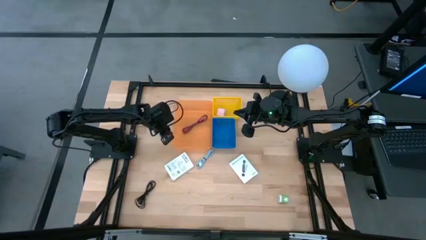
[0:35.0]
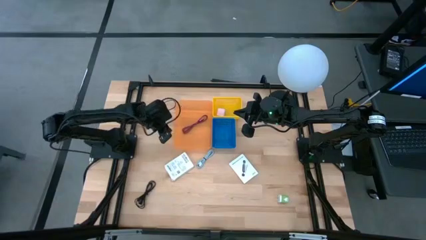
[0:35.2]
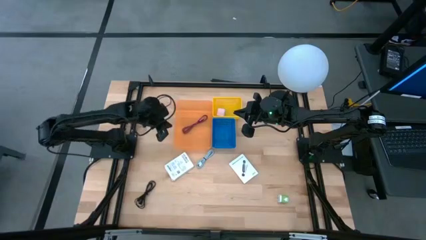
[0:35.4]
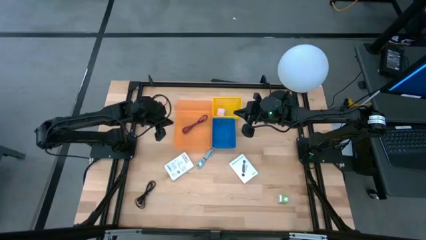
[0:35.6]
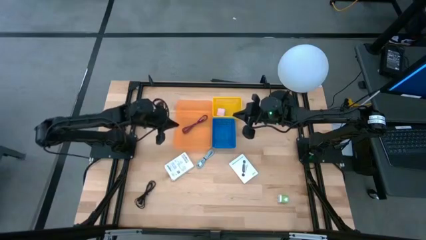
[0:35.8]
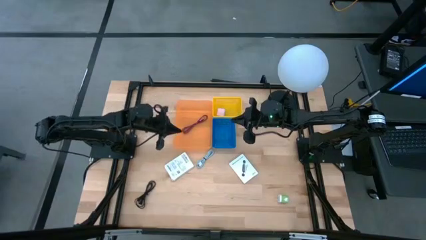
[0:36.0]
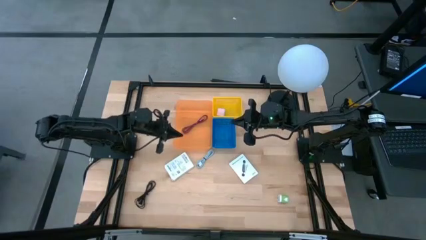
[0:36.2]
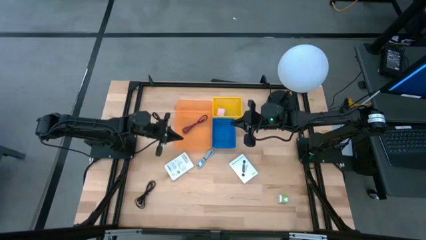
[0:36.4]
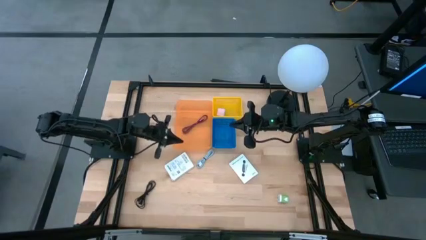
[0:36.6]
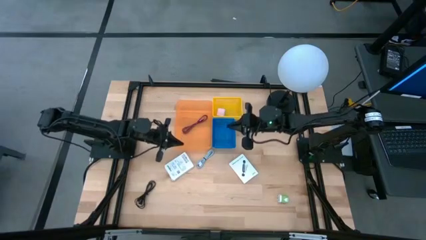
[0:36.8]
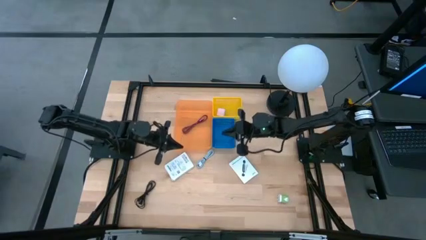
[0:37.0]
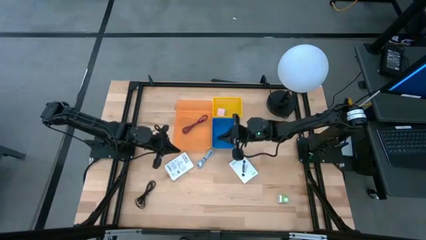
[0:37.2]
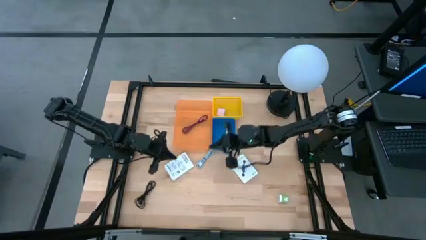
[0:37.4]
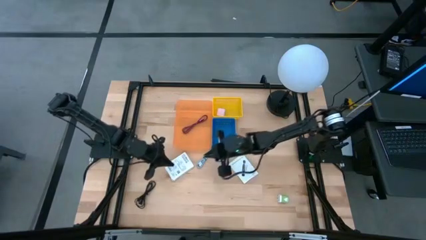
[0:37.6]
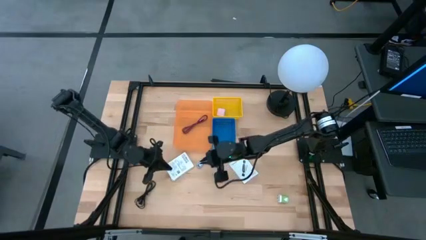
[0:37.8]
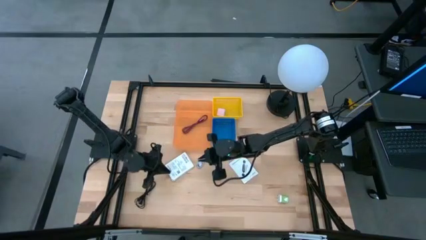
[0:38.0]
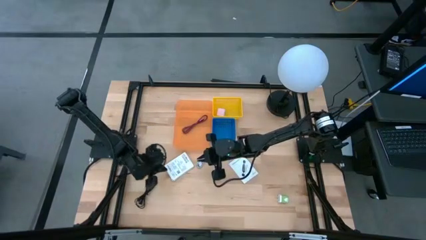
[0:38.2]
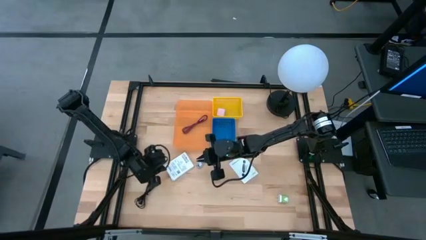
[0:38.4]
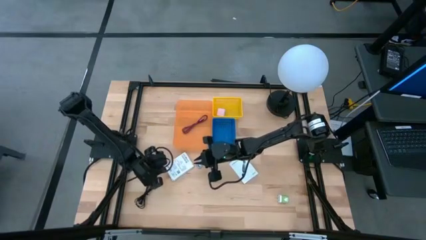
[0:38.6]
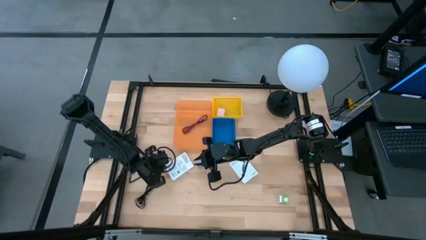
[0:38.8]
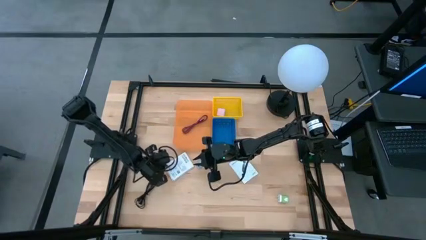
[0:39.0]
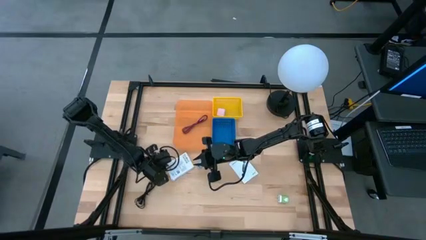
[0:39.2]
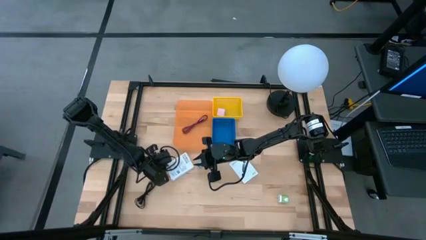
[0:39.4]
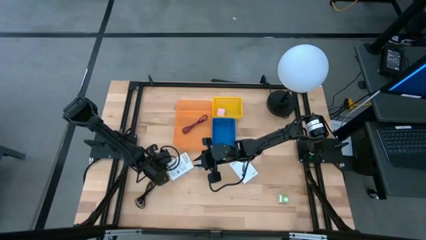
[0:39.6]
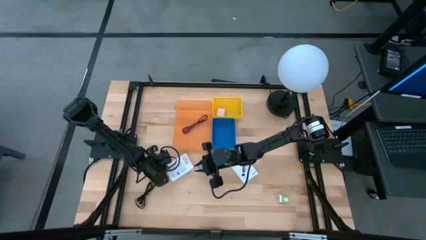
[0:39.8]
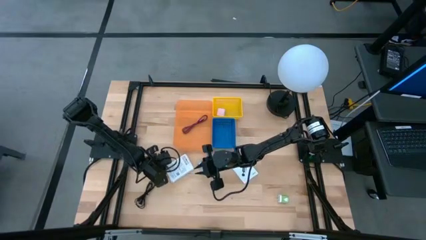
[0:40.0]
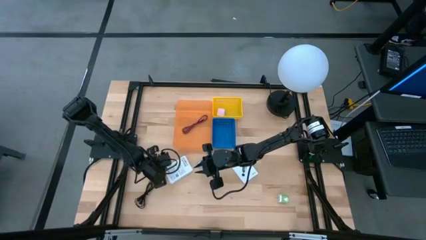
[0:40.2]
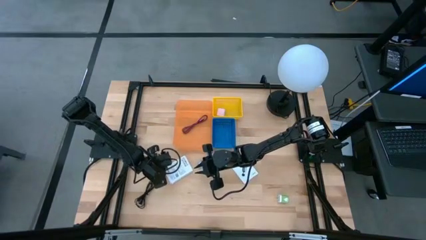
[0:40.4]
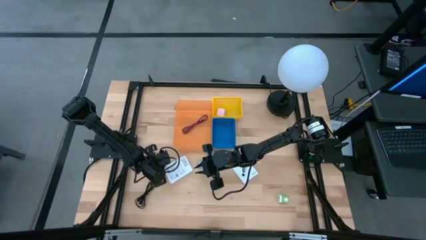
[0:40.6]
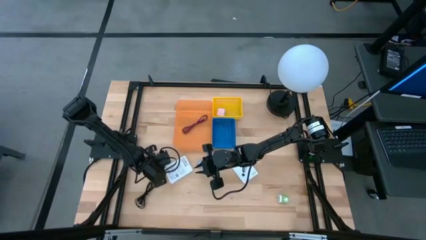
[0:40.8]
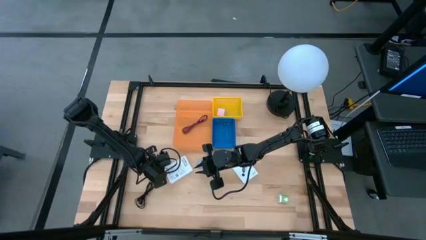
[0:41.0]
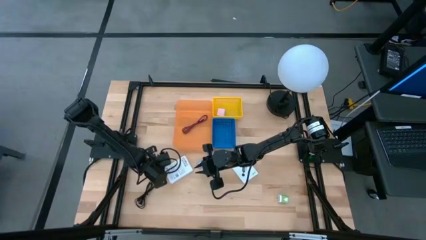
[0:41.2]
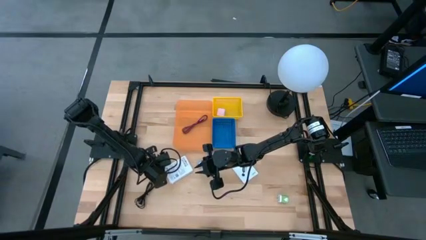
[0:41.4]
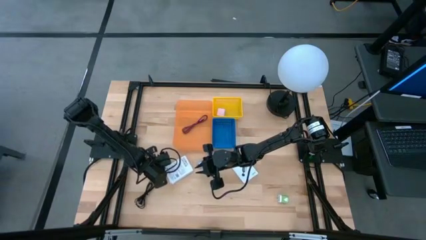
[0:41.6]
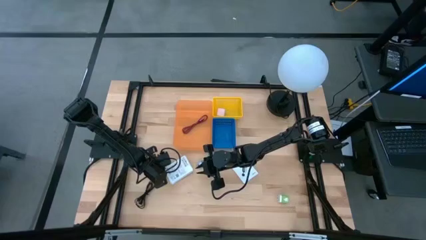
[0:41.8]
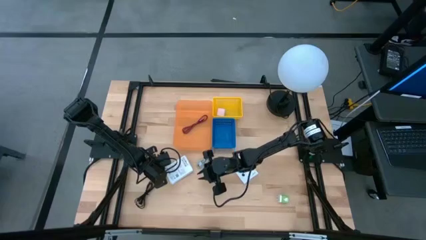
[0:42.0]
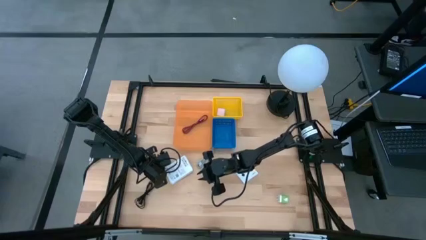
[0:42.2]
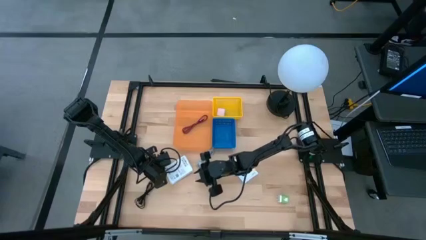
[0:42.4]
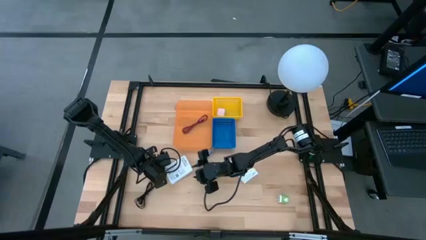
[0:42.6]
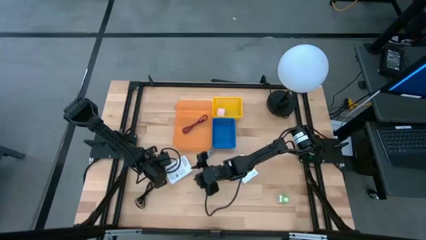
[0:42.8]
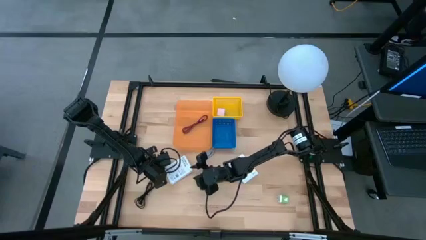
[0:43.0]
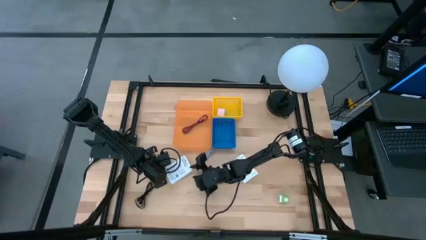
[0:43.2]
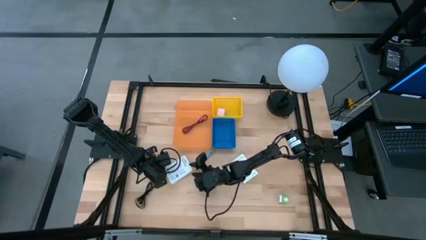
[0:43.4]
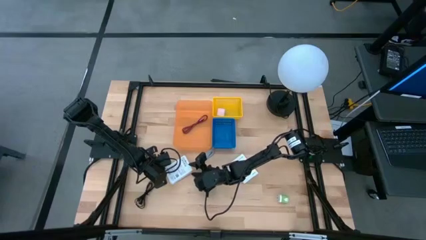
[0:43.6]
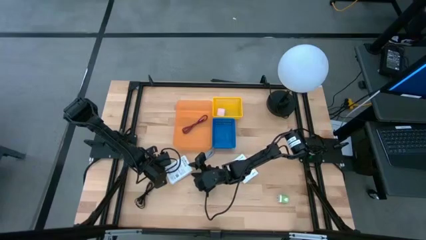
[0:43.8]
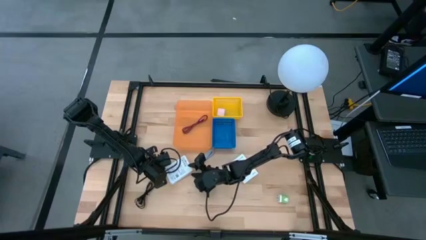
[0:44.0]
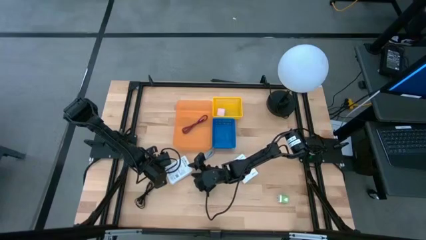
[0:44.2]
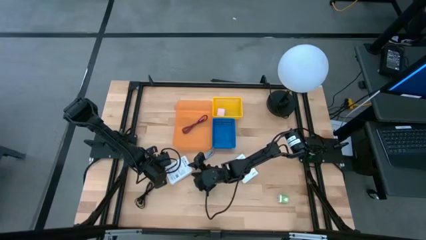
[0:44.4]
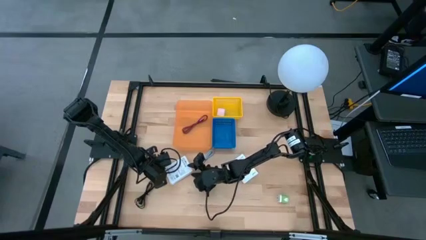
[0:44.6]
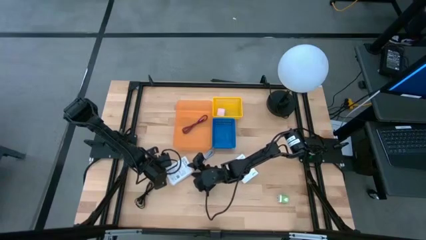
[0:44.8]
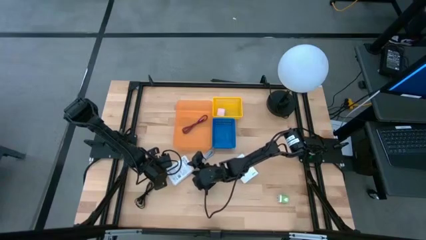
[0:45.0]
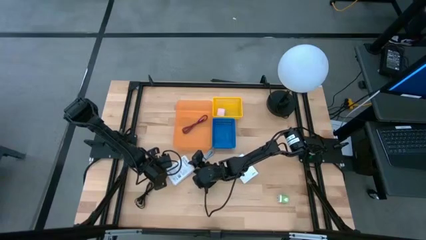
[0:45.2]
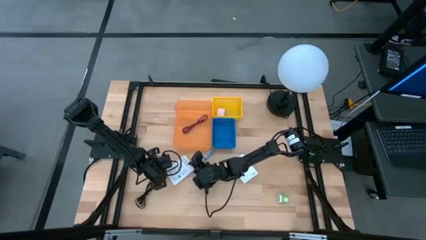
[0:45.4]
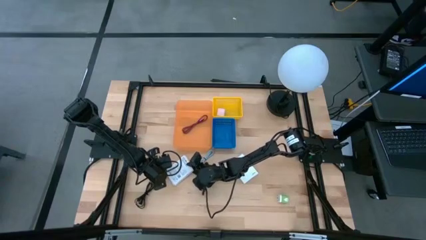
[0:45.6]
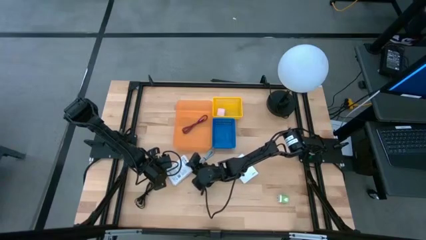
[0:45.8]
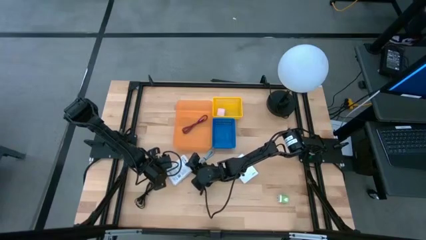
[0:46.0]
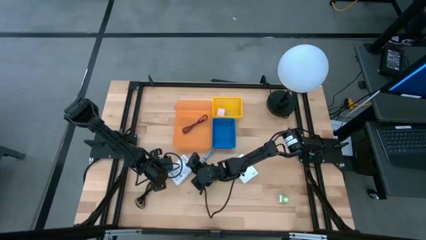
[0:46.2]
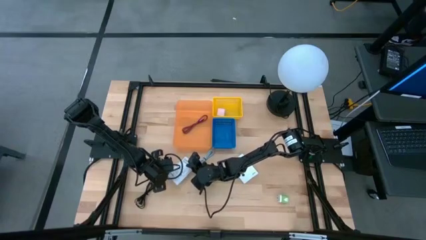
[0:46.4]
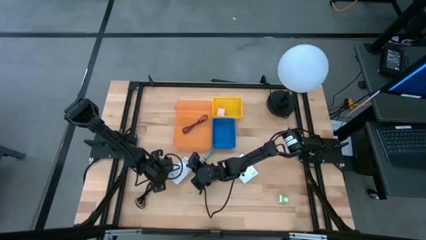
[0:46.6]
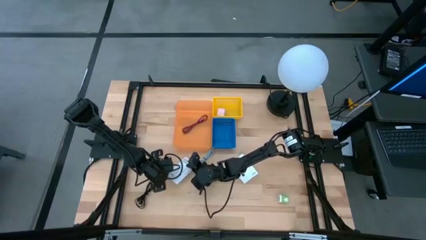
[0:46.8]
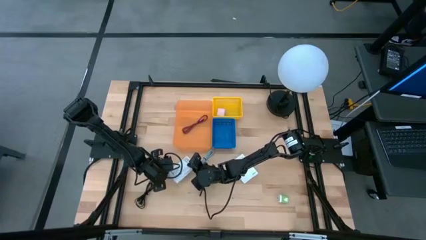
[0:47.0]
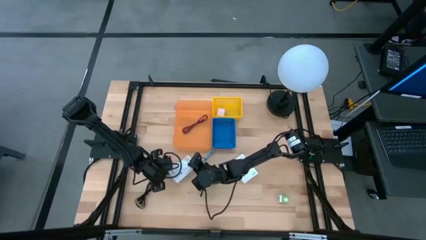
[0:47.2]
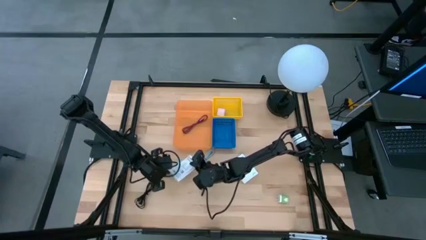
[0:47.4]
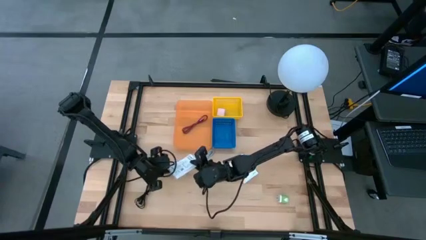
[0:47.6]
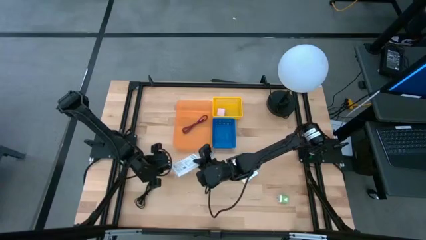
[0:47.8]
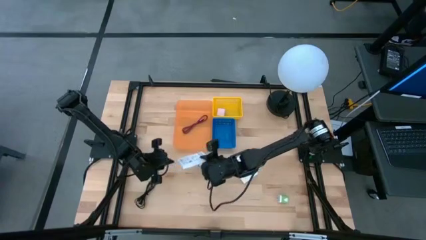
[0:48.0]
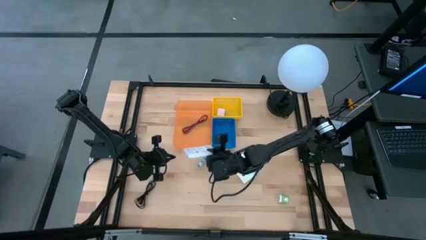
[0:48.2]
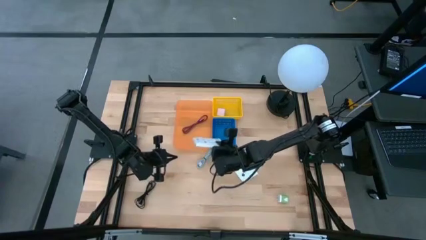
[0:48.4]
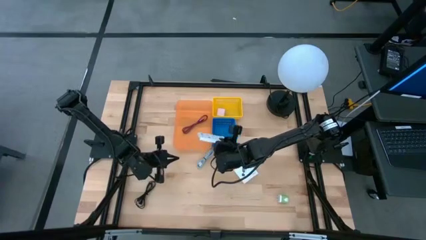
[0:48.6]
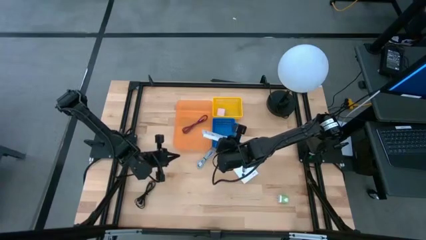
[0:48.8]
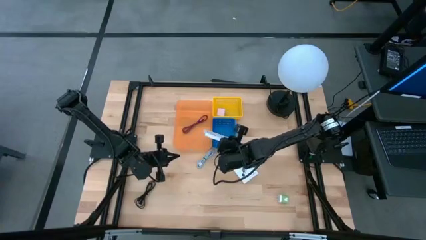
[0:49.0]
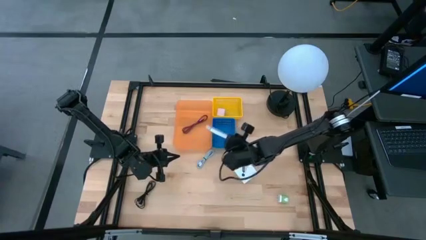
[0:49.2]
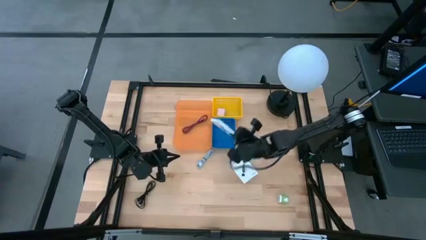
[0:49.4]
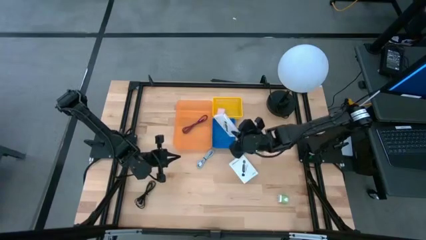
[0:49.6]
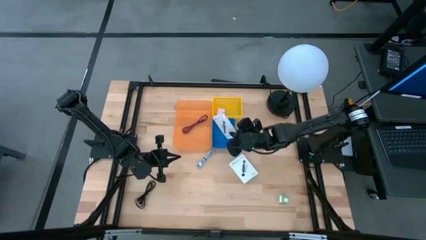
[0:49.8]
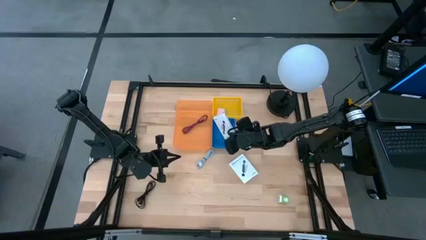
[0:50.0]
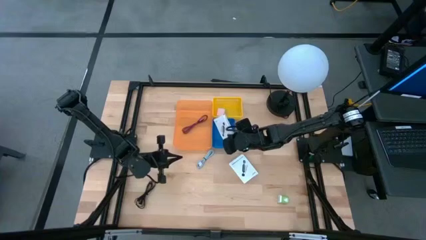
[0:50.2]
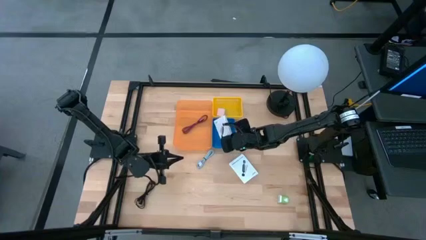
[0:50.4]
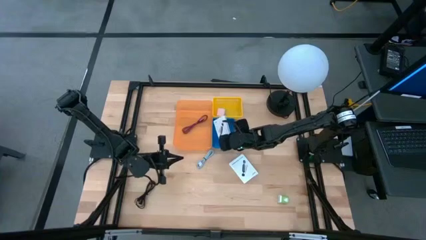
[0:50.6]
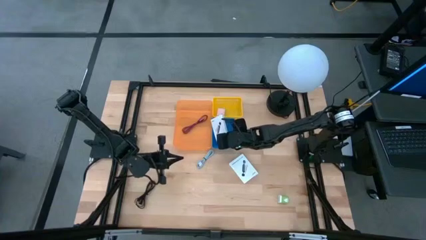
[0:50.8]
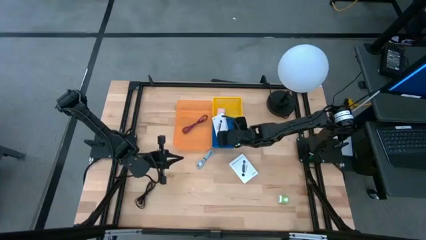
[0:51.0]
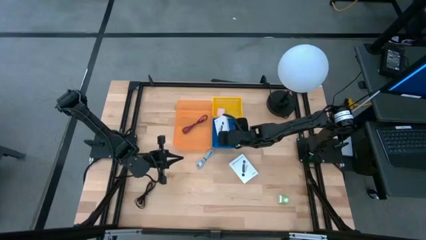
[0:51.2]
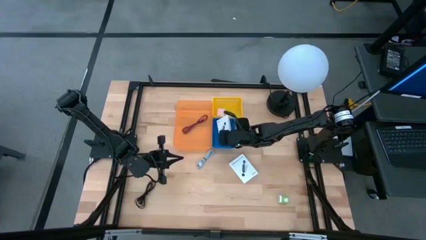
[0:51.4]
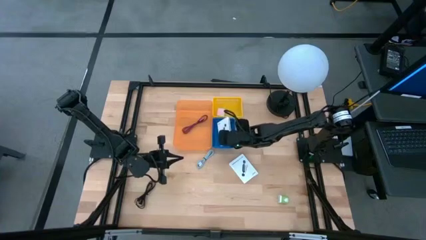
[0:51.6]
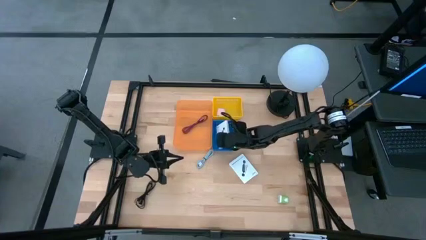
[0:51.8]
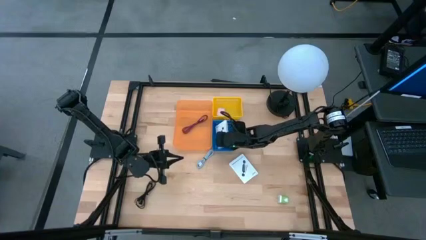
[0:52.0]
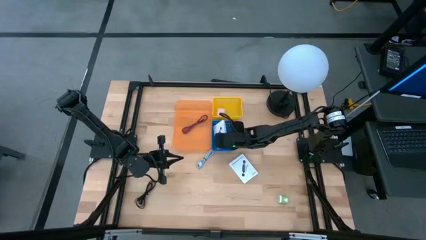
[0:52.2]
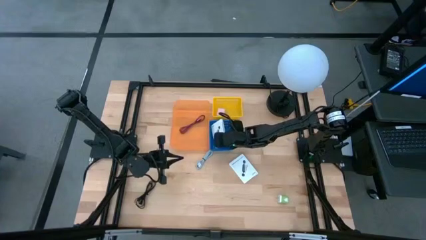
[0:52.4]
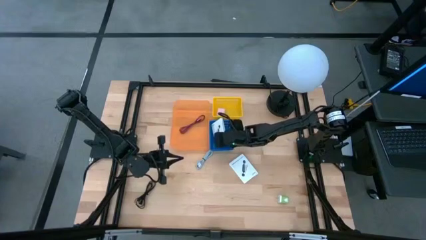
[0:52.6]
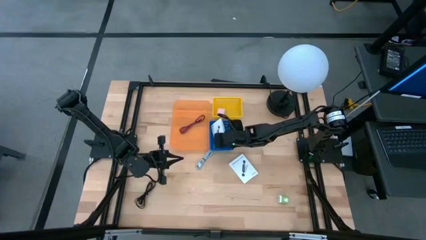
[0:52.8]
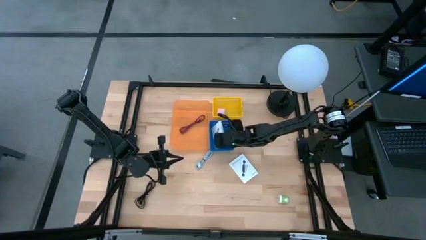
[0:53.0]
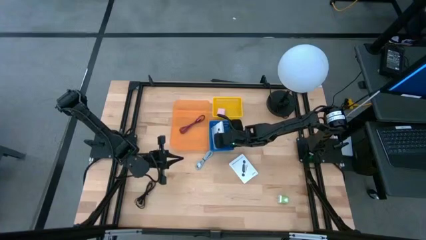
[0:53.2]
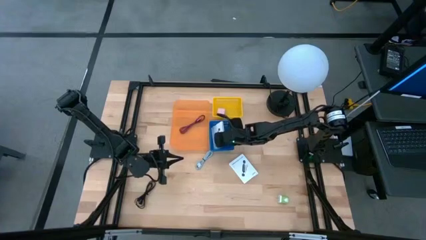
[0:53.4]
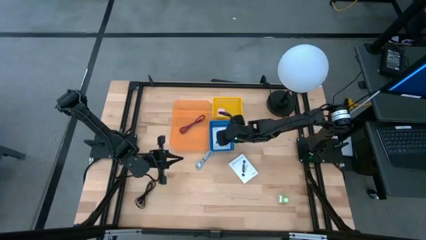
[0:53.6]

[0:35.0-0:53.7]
Task: Pick and place items into bin
Put the left card reader box into the blue bin
